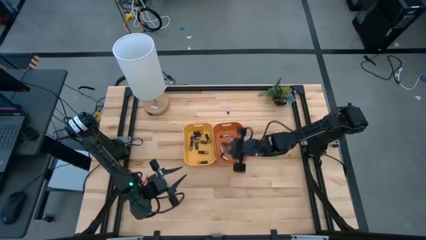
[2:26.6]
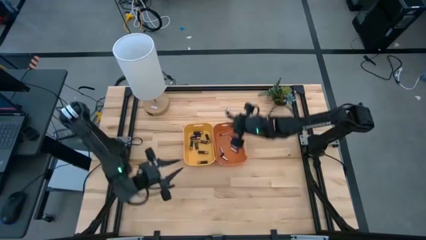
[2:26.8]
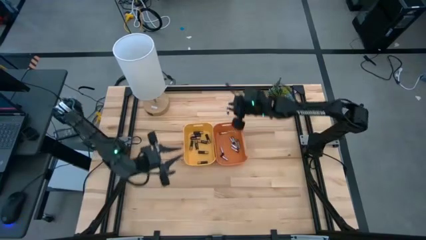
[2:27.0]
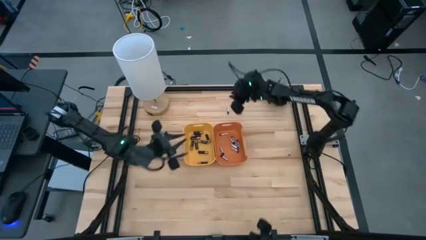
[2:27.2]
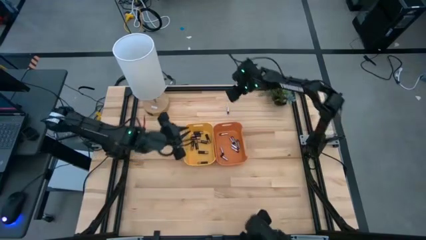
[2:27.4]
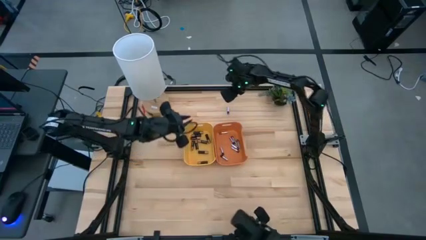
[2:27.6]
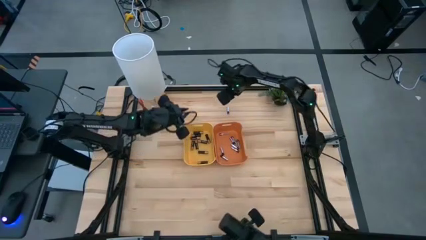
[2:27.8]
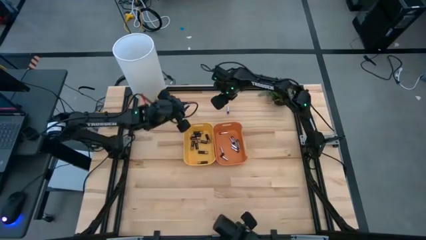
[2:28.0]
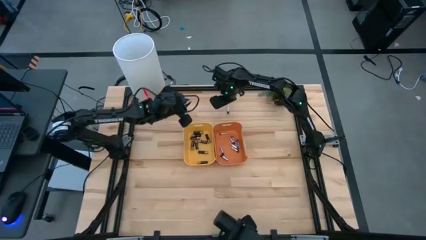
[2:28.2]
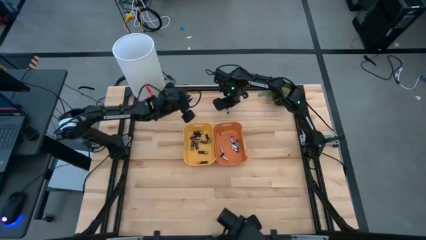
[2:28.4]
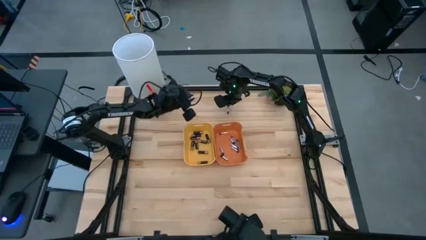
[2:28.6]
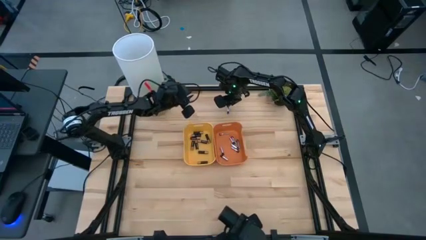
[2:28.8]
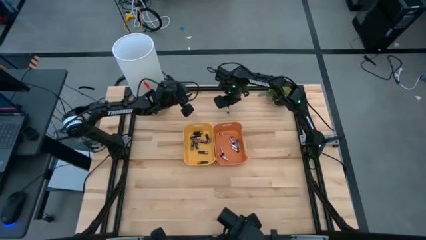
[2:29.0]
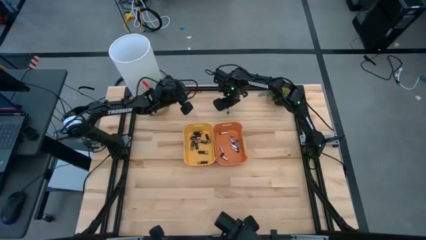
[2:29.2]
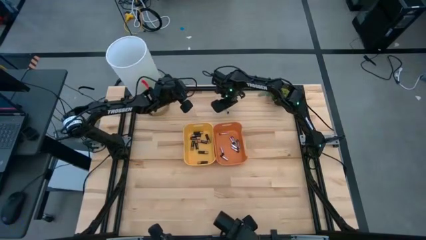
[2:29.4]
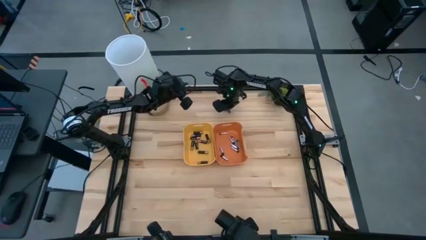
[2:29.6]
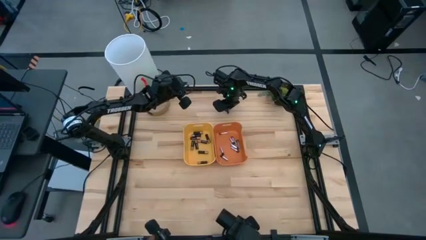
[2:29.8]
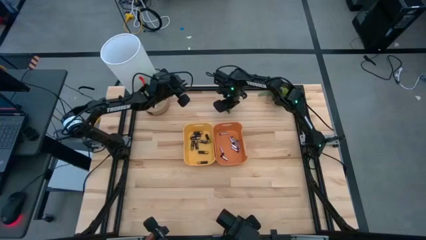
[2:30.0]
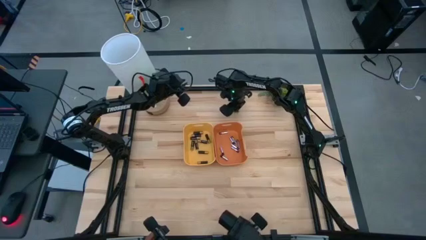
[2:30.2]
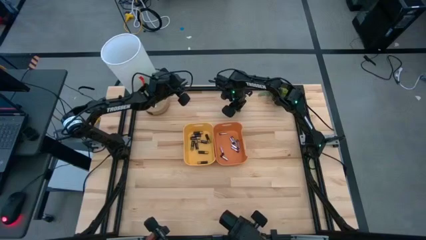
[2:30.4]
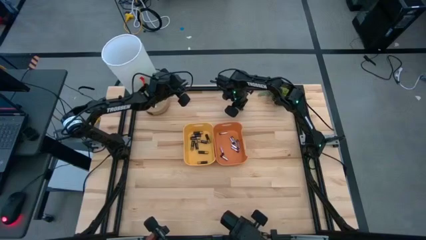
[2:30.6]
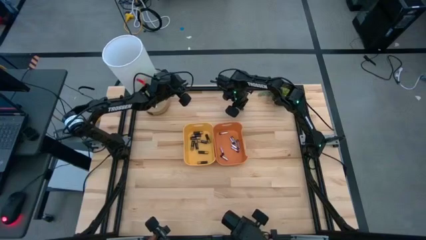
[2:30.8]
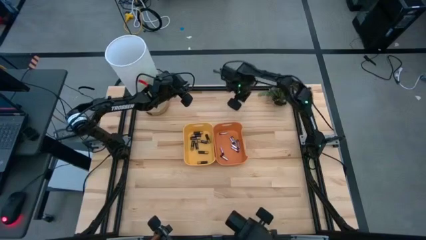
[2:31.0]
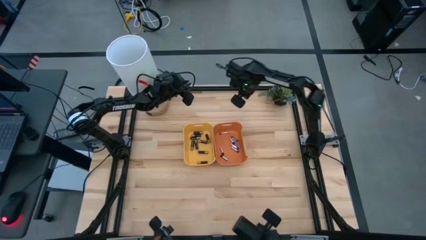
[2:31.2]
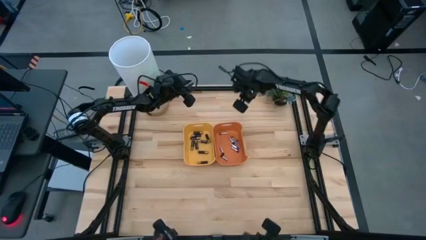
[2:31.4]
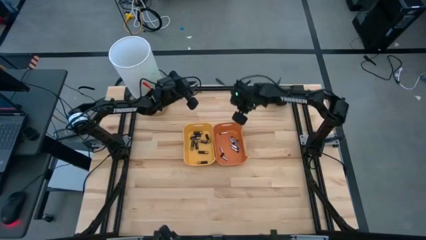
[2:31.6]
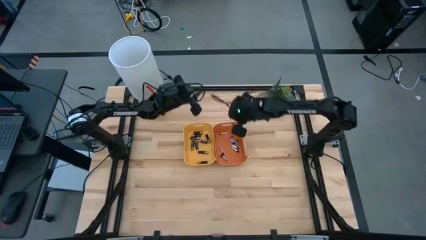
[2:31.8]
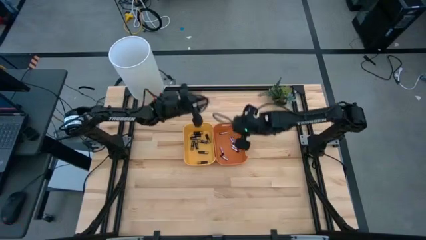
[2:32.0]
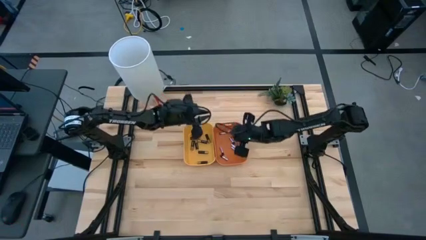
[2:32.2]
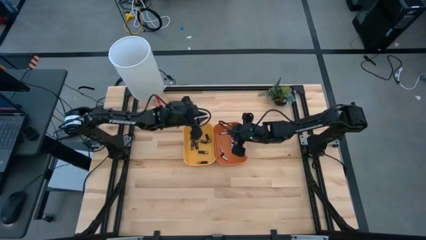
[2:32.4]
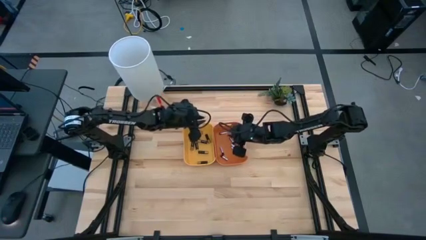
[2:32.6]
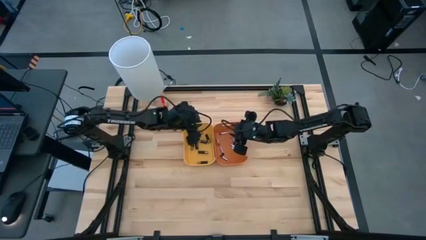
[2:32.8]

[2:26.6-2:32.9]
Task: Sort batteries
Put the silver battery into the orange bin

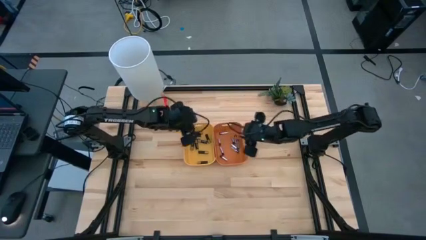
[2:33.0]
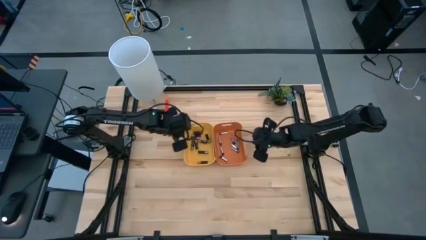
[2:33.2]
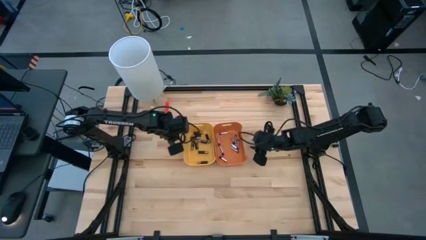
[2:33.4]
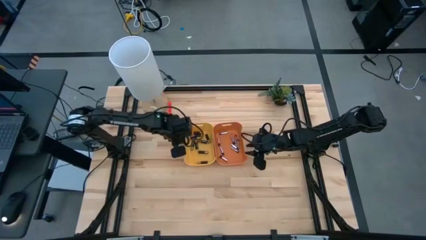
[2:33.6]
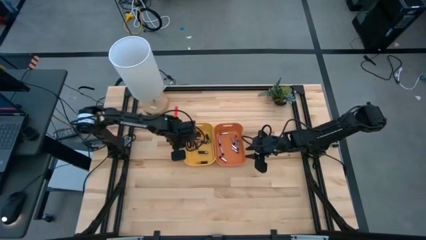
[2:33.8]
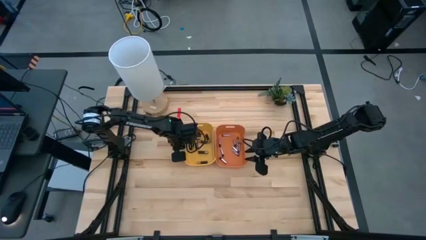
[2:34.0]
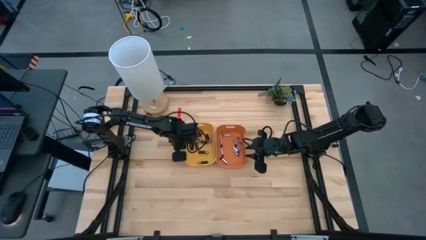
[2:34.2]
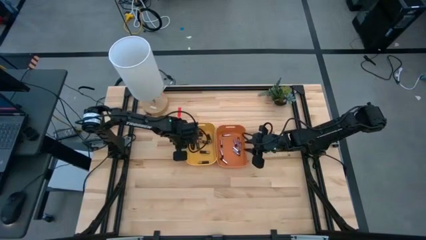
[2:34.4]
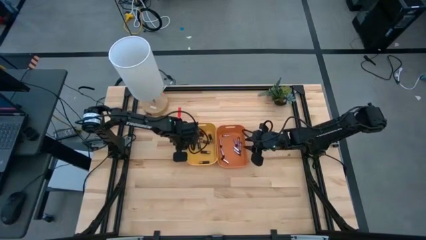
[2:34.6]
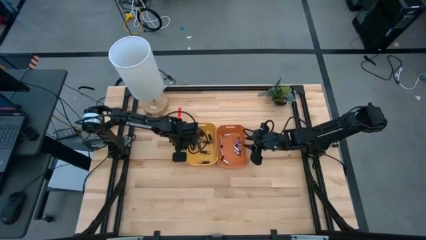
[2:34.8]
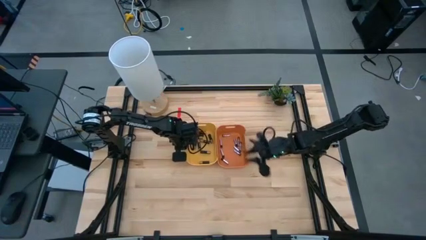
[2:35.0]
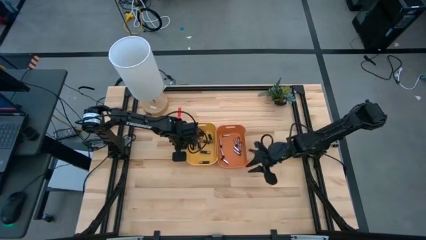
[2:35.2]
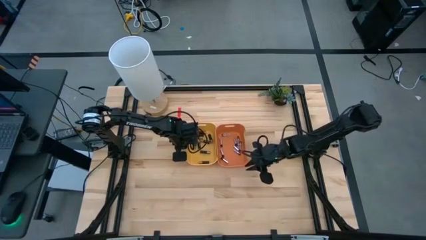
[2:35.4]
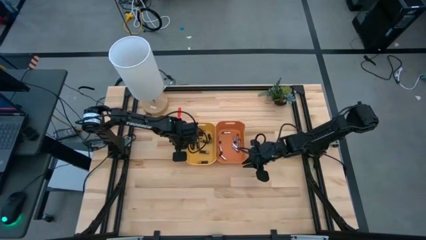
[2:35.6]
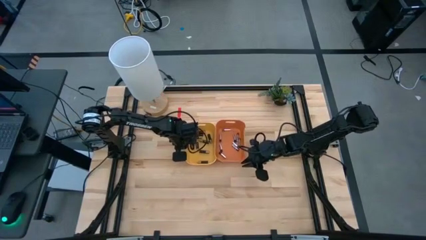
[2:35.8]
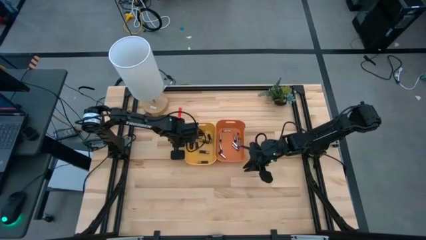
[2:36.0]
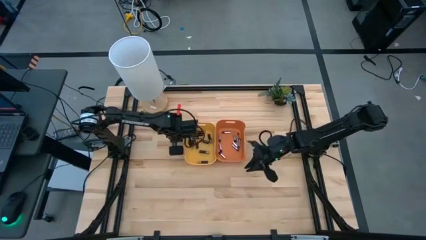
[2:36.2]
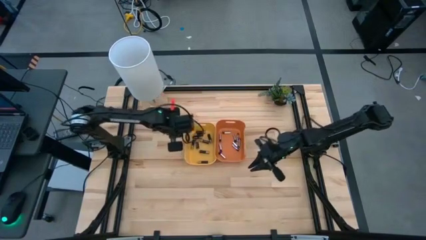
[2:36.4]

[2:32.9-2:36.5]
Adjust the bins

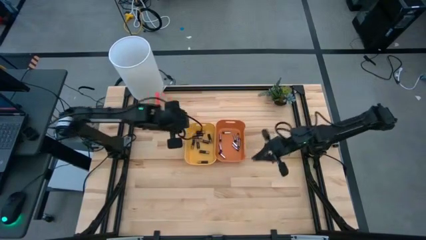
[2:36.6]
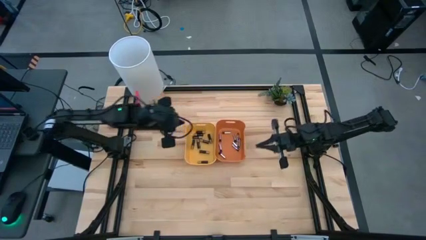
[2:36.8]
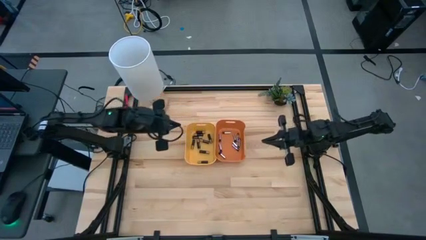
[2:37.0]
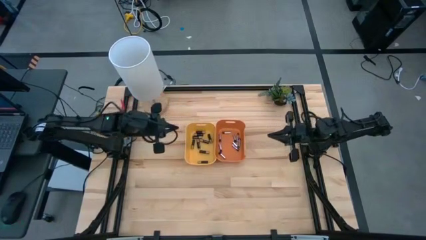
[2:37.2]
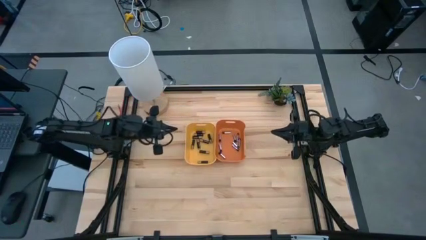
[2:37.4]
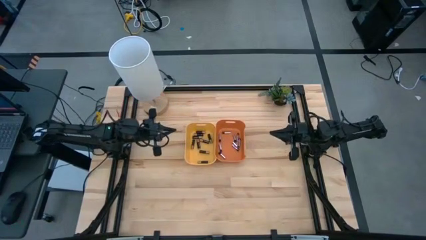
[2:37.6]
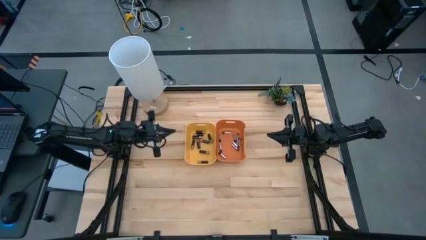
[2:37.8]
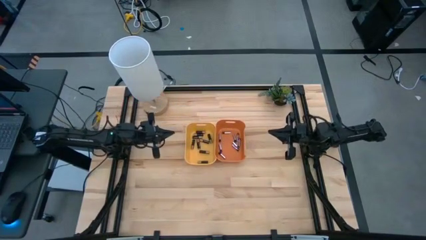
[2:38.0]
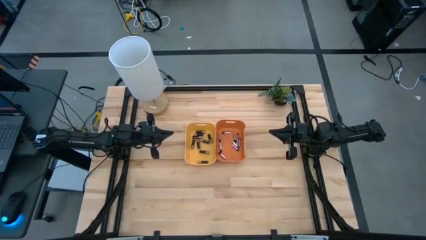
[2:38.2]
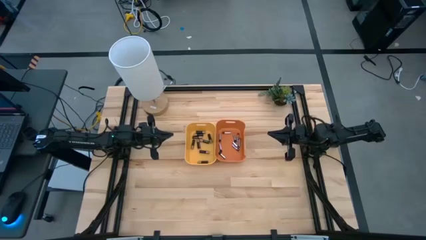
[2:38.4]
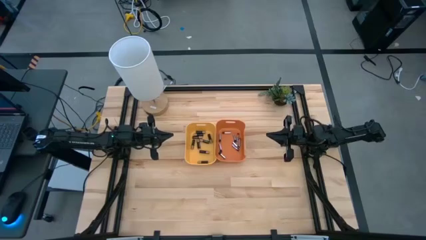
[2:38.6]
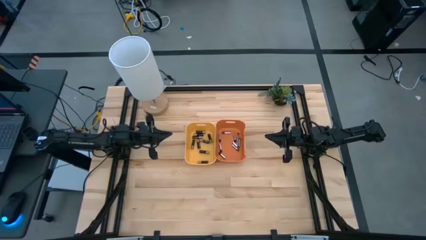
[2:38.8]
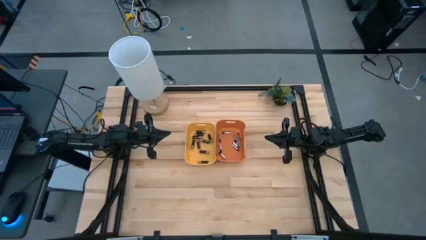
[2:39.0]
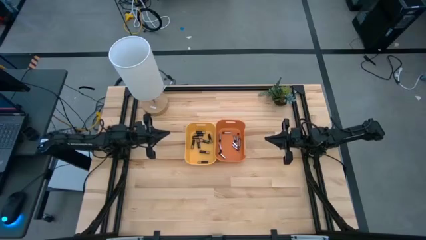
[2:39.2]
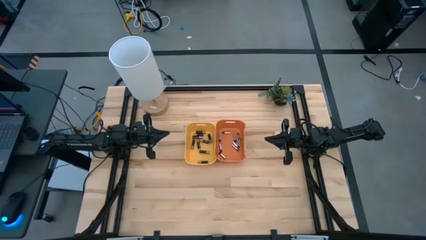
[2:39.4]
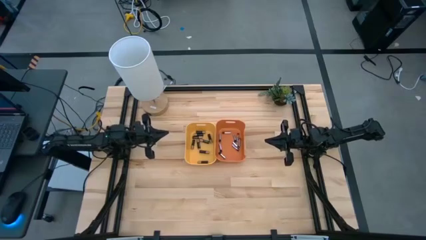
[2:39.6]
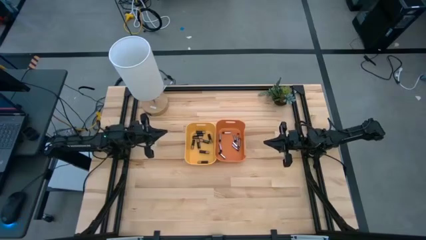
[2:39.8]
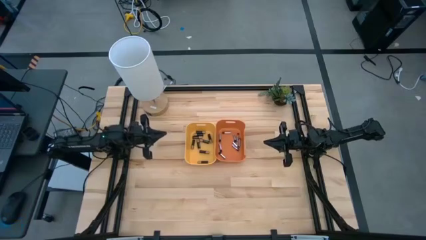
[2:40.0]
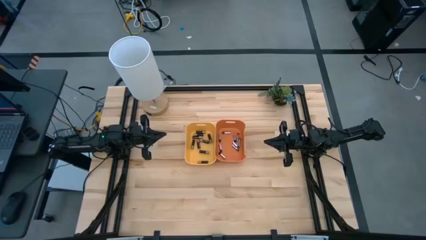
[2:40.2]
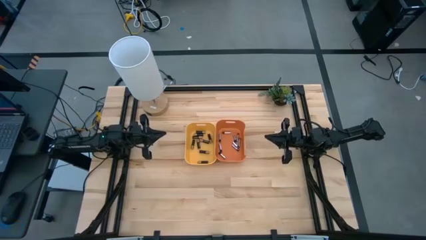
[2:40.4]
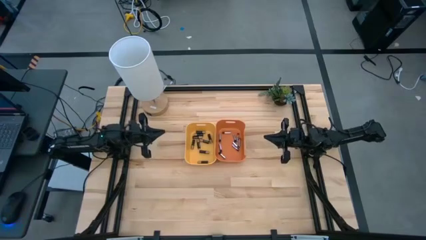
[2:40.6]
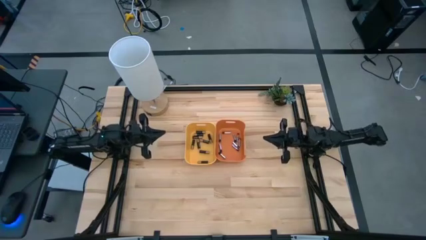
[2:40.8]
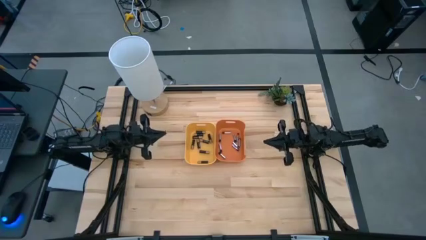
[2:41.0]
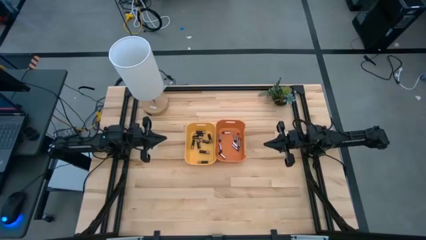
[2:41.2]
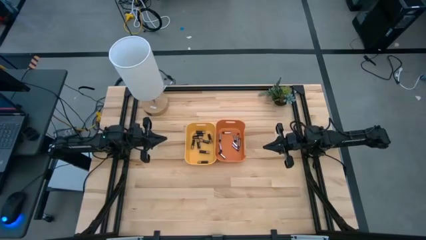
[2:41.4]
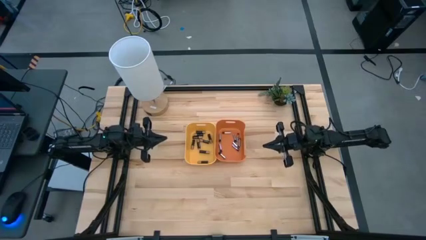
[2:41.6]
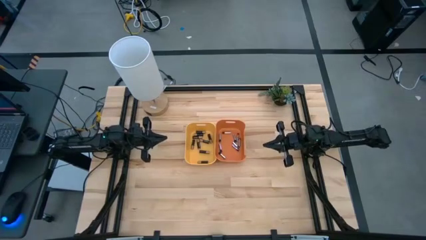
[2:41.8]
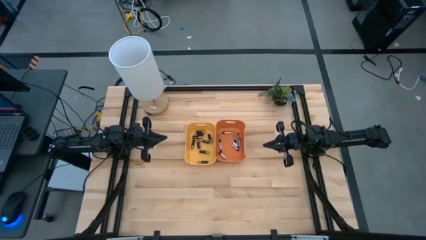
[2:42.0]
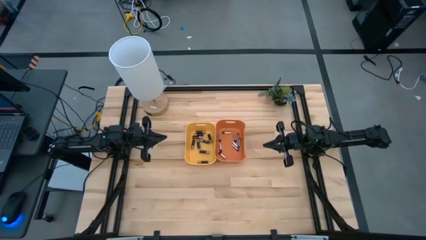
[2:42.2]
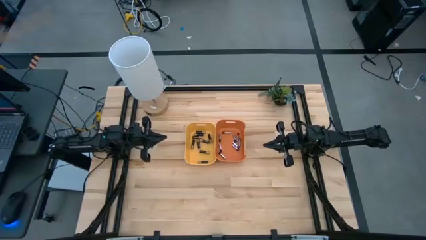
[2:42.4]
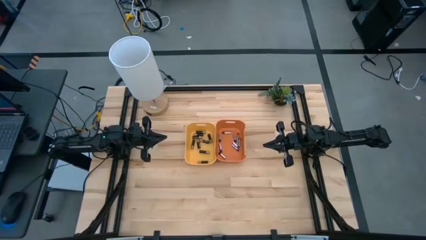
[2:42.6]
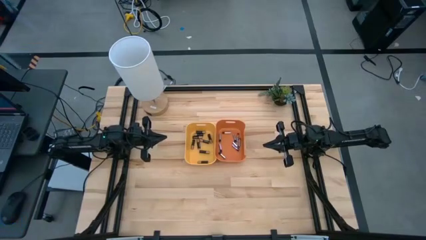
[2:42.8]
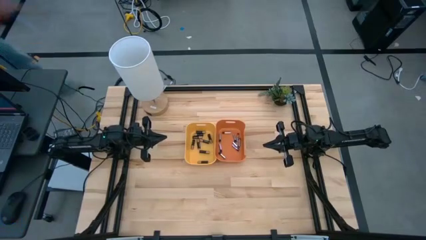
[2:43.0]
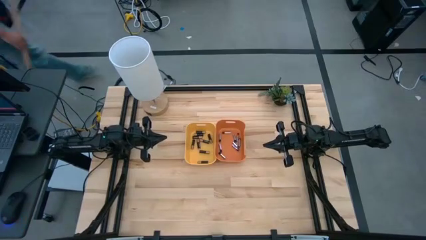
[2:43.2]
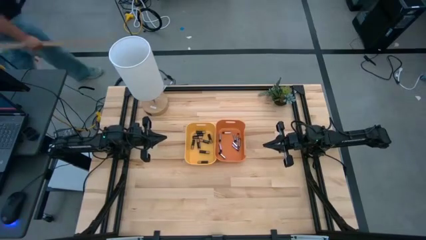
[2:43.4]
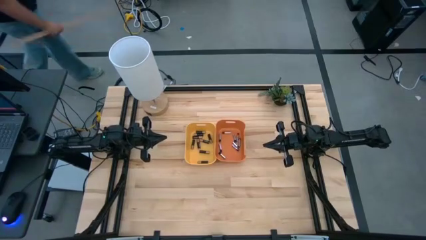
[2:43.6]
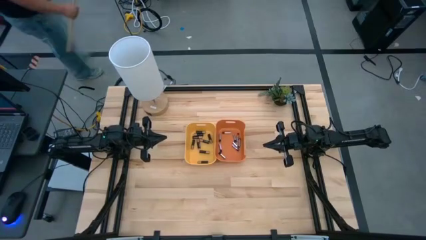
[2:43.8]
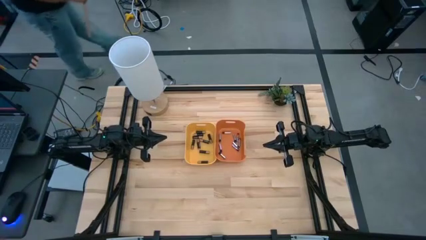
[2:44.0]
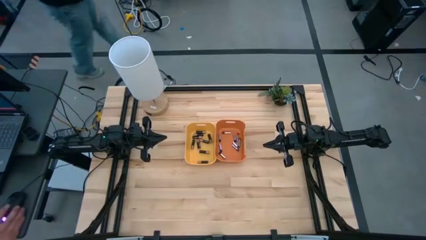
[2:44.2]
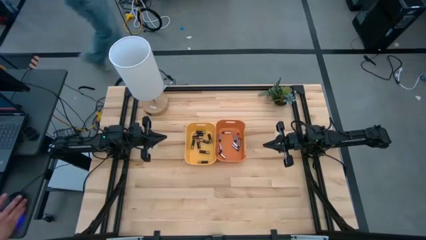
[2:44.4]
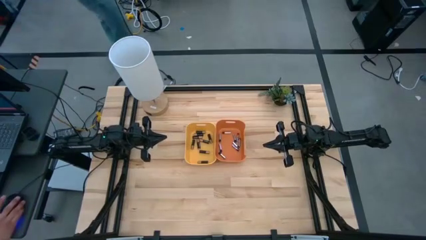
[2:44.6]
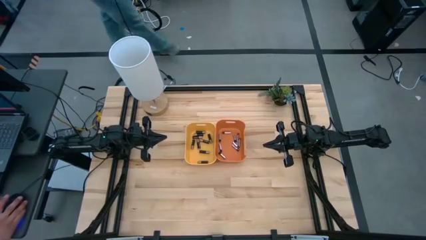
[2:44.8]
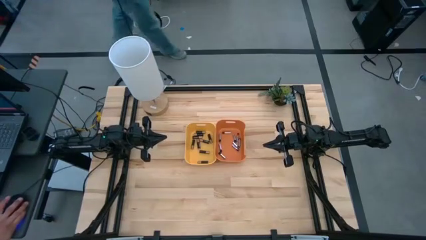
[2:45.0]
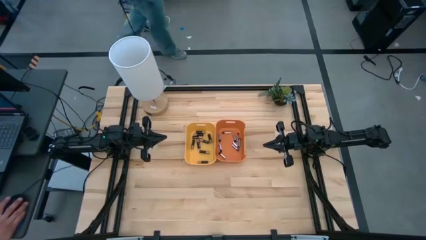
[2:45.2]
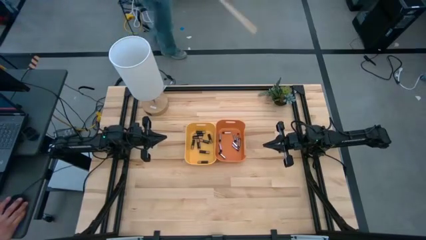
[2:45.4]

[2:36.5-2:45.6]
Return to Home Position
